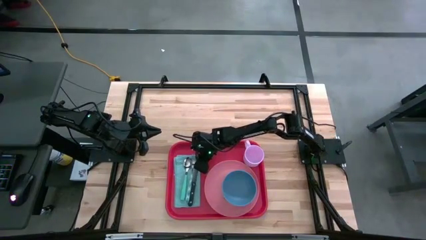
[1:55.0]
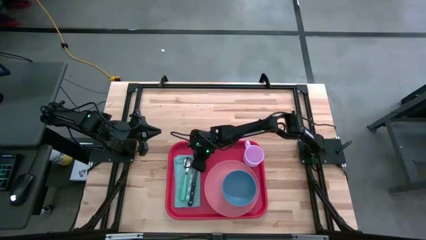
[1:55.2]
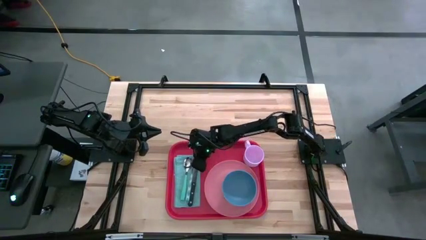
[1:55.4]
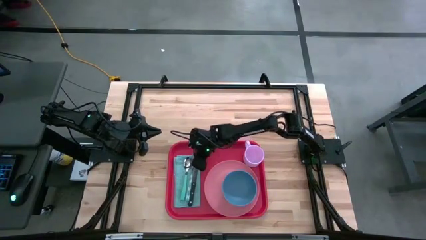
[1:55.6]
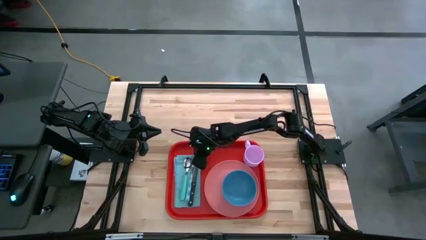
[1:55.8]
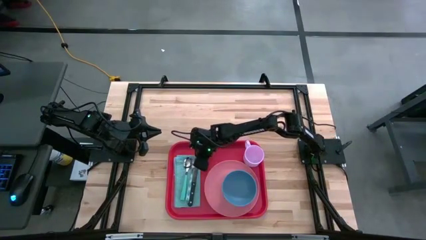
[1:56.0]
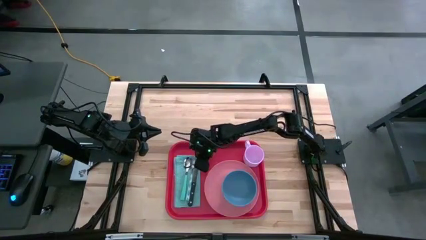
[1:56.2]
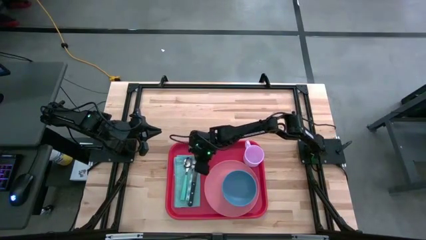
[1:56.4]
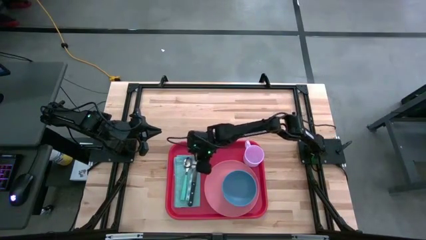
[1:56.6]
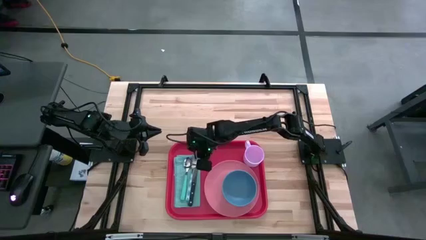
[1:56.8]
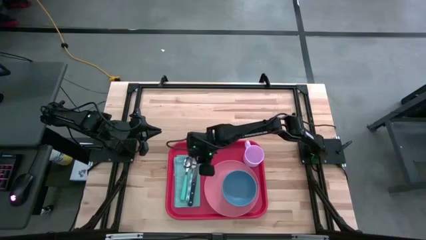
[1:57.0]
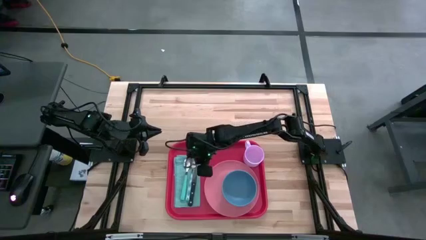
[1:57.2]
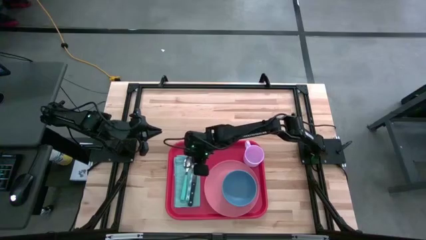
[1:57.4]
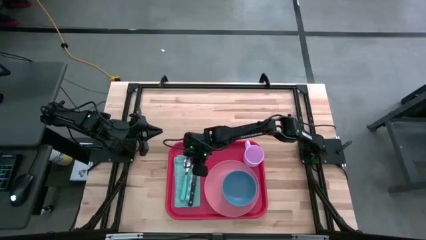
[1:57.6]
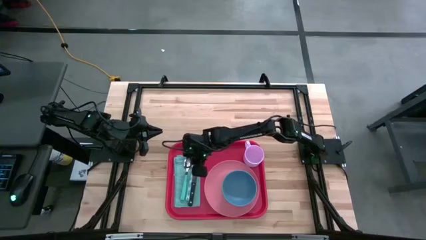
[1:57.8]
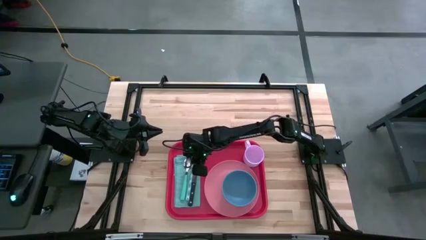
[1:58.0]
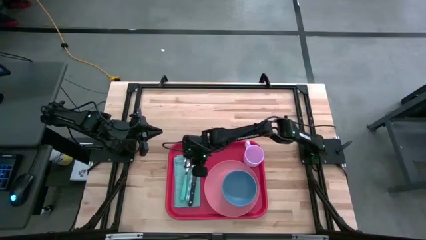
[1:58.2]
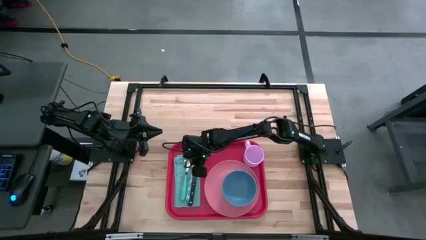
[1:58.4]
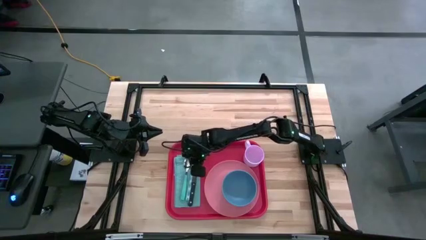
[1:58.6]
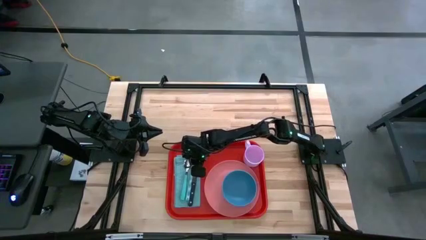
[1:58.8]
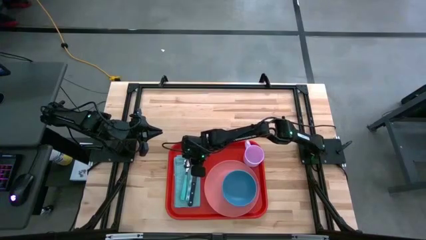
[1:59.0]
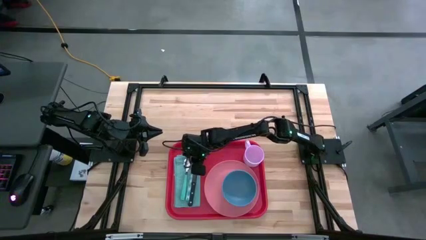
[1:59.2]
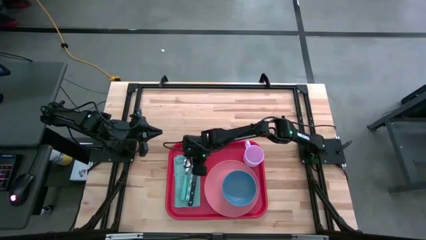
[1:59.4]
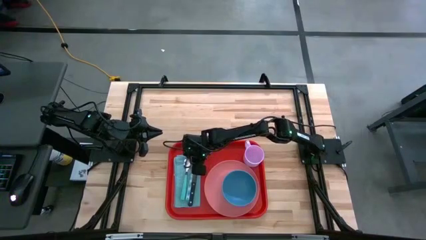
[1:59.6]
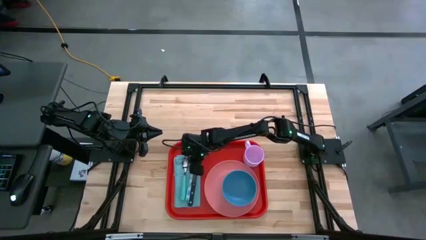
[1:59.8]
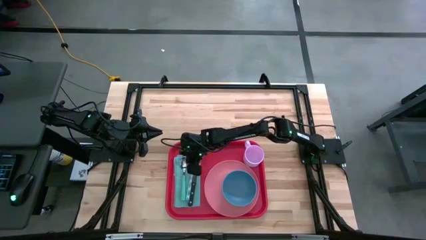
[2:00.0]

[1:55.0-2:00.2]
Task: Set up tray
Adjust the blue spoon

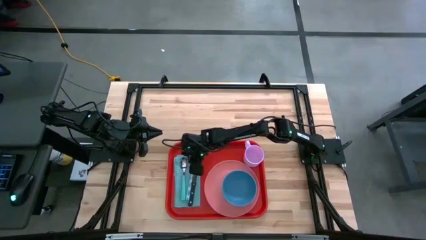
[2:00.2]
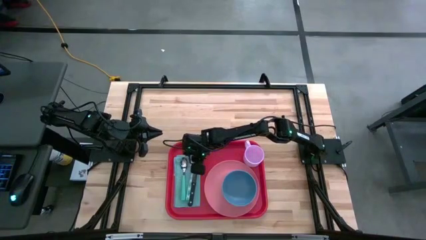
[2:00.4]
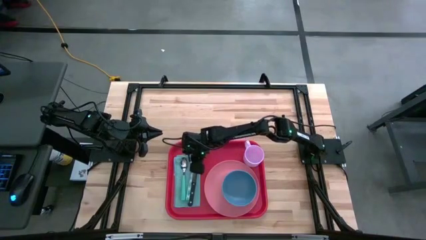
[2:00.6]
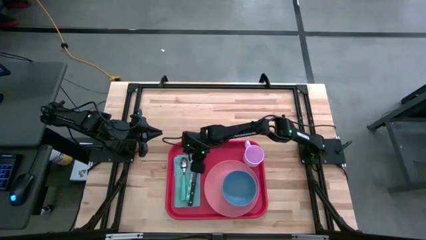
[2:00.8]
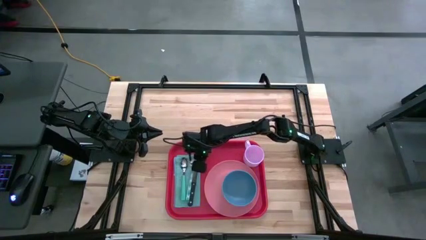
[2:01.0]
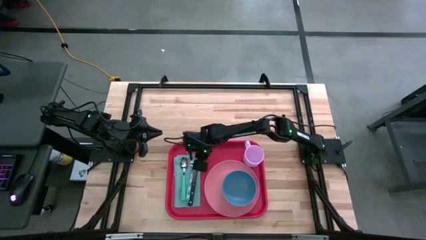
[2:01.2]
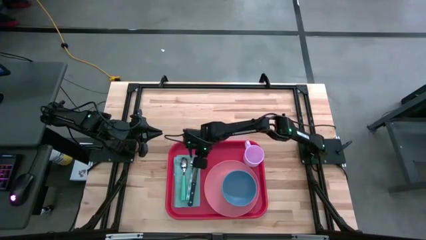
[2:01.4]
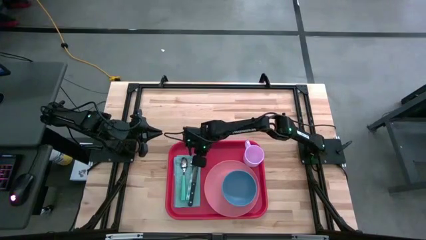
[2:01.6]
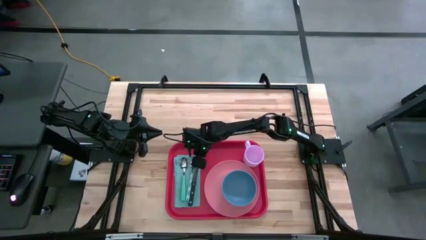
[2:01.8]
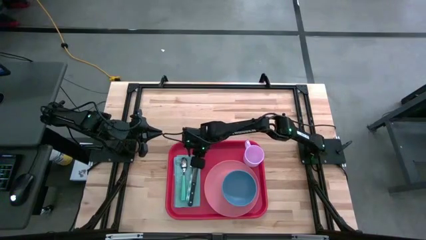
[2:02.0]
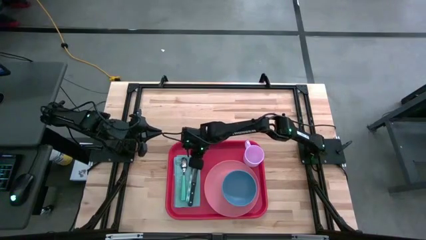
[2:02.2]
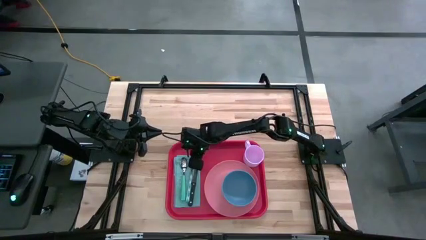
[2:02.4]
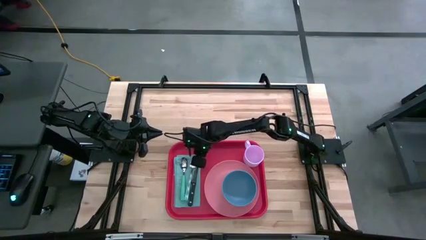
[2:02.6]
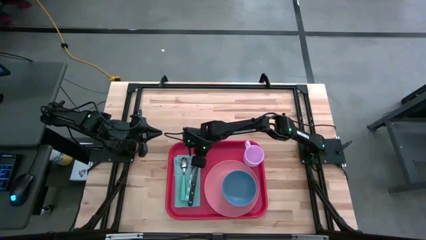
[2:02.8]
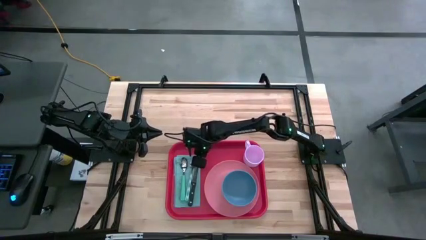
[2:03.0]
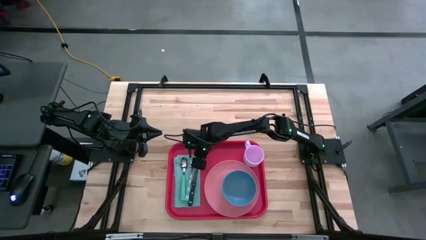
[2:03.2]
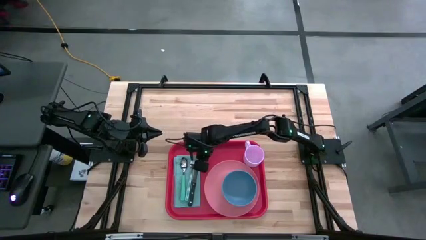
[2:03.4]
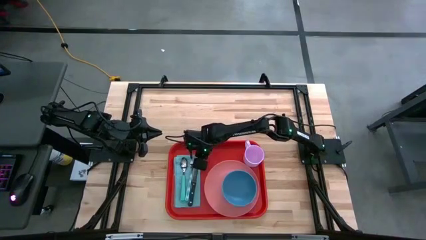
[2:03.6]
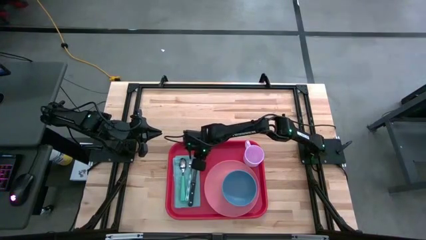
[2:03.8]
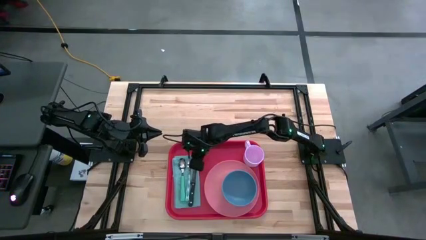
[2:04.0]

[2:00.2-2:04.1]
Adjust the blue and white patterned fork

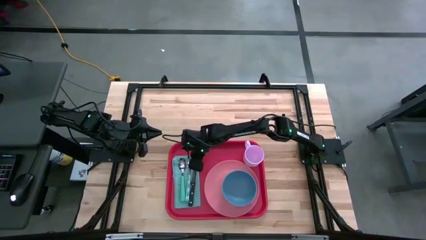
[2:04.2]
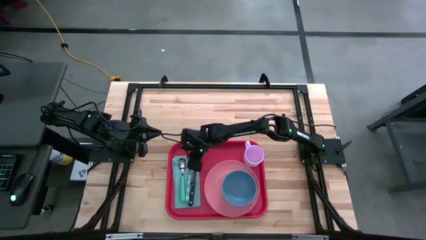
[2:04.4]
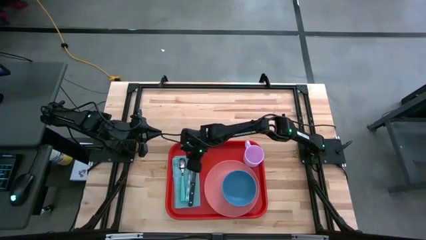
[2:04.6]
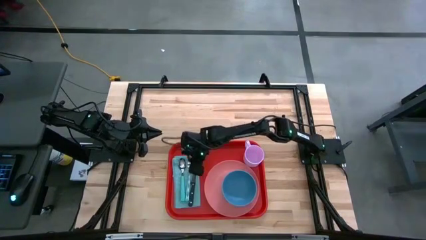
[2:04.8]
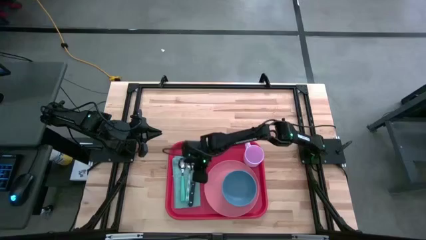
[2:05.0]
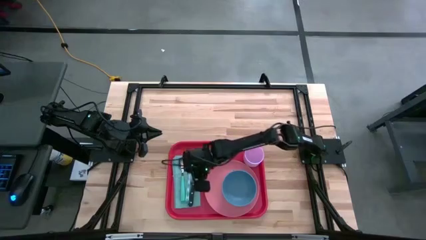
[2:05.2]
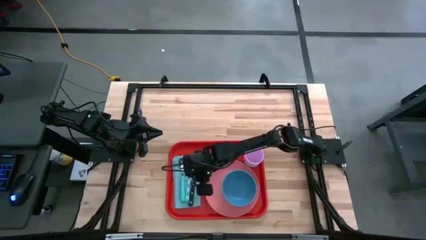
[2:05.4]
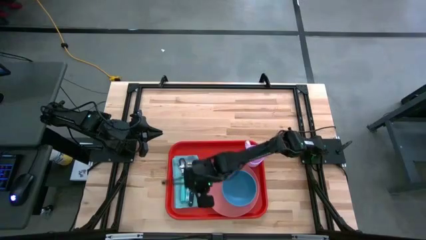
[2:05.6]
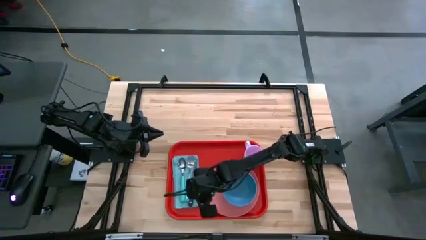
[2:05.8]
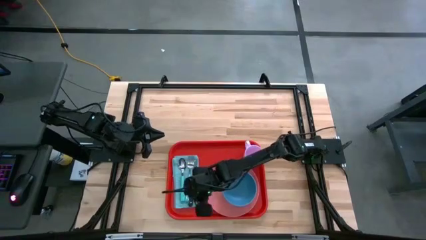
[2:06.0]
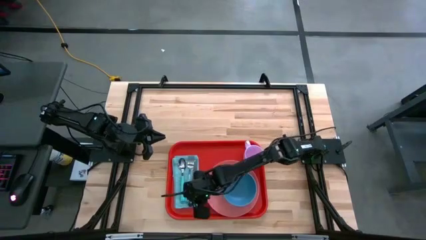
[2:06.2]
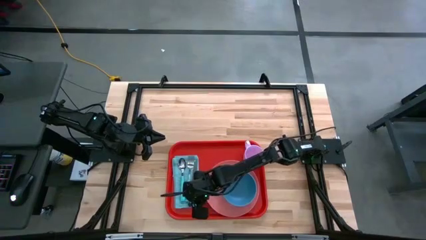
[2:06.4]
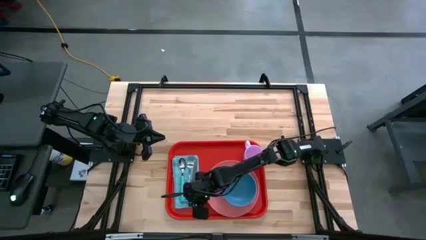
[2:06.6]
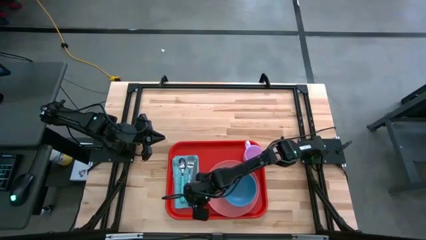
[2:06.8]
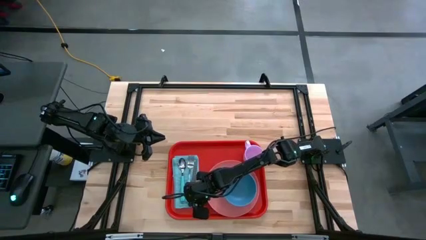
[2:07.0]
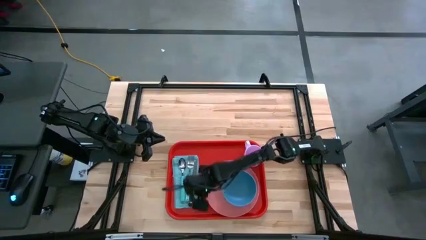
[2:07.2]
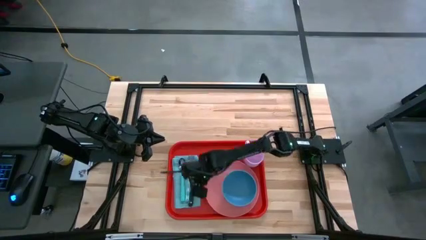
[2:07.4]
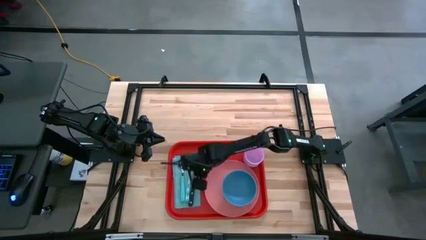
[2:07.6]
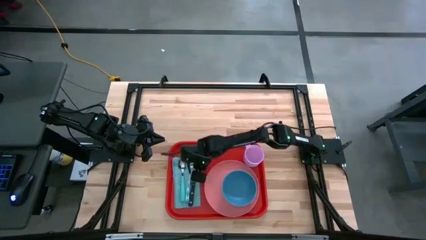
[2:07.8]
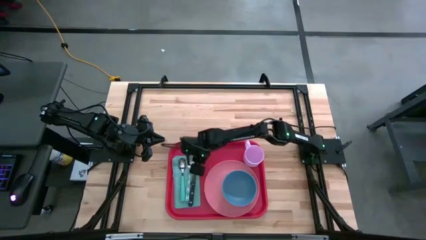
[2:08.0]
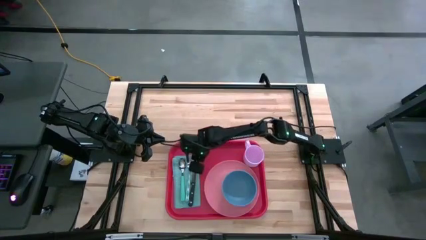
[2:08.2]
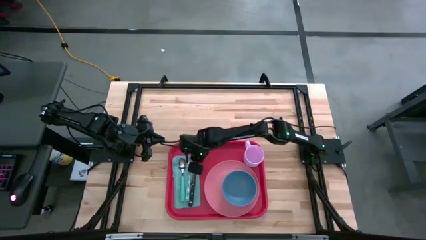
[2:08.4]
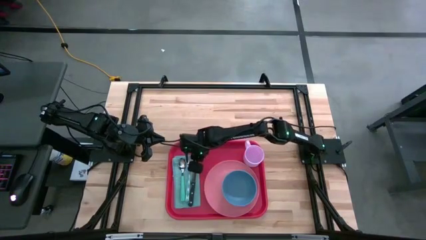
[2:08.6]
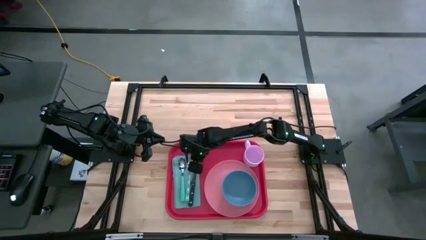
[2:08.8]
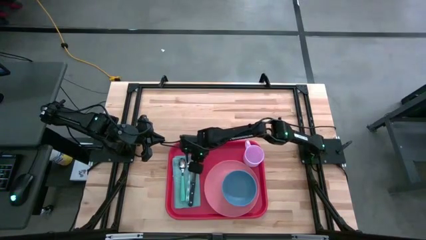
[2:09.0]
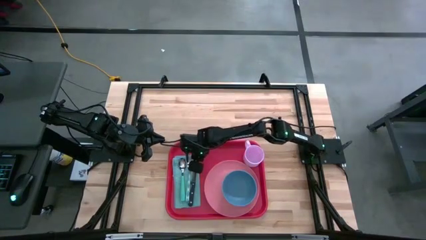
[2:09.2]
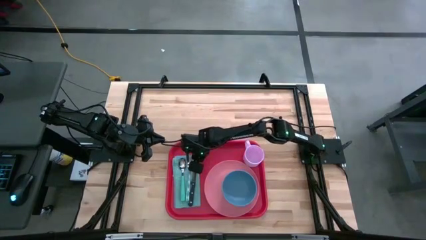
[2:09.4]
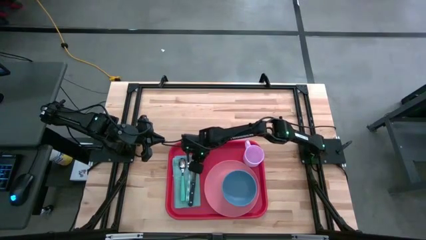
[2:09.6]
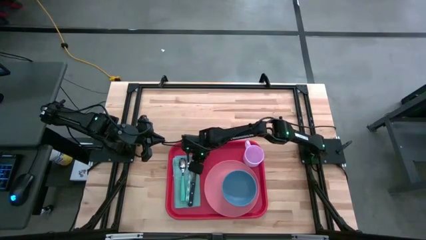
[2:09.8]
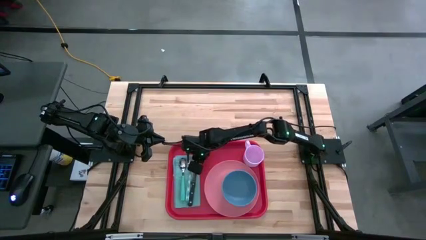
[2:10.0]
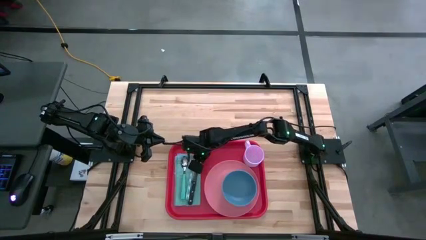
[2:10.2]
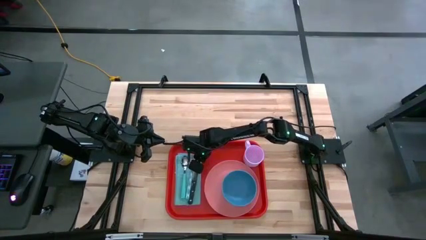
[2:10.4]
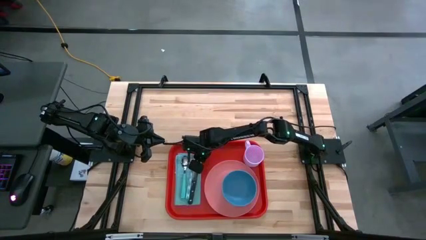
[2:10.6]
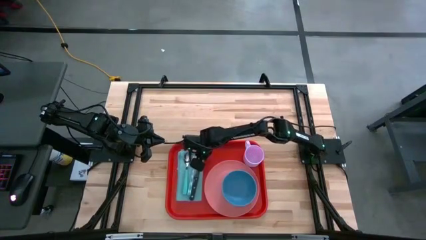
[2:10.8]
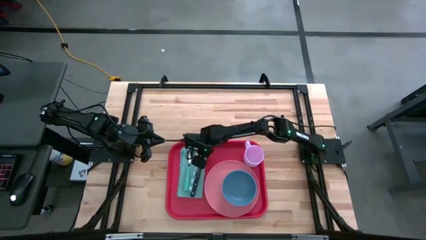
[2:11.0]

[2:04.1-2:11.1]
Adjust the blue napkin

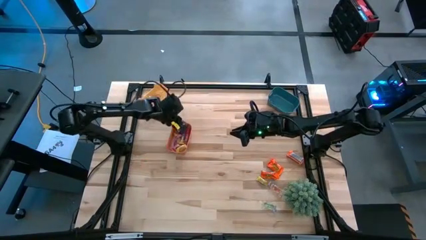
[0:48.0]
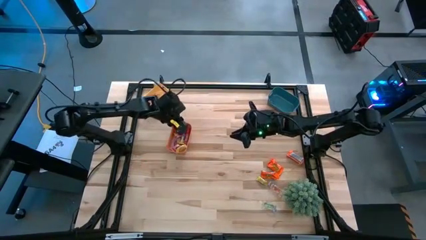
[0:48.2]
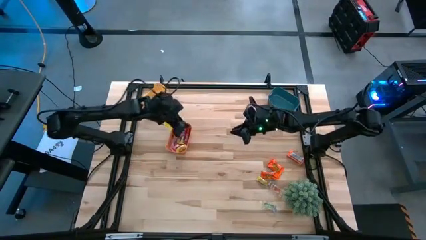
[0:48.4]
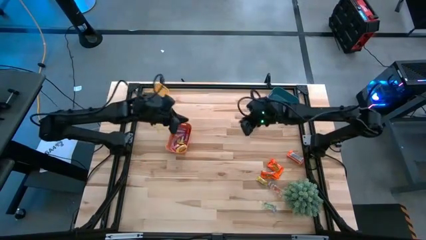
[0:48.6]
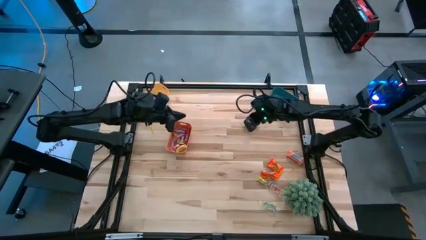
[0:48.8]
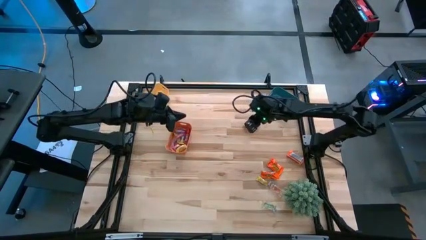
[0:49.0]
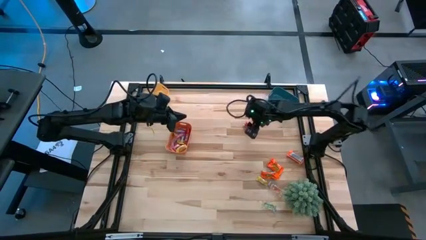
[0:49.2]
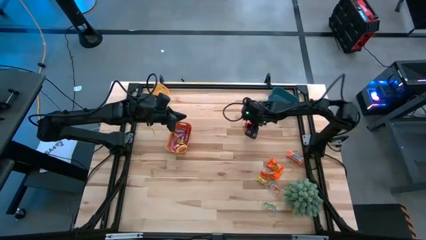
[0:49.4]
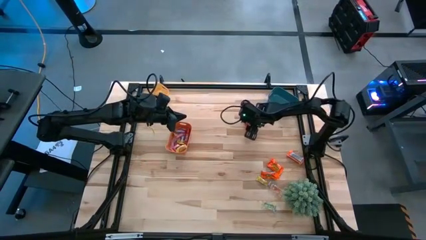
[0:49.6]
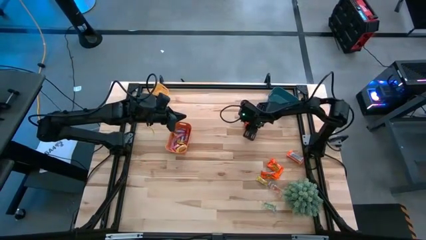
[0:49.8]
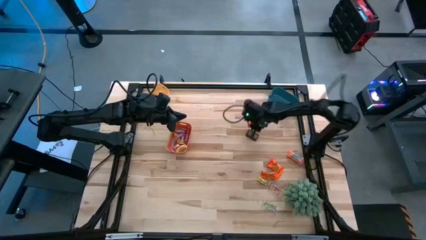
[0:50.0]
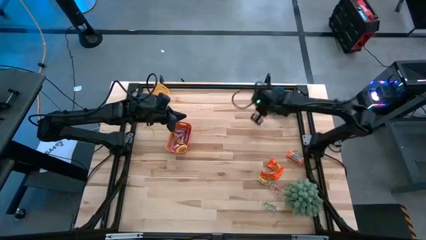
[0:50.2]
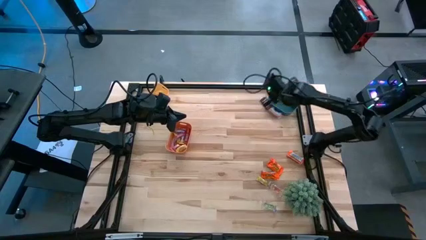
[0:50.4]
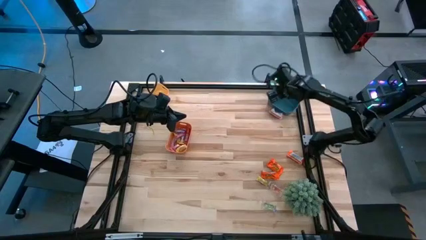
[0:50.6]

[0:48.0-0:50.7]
Task: Sort candy
Put the top left orange chocolate into the blue bin
